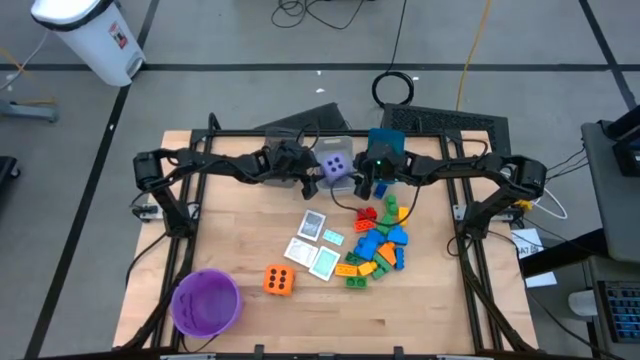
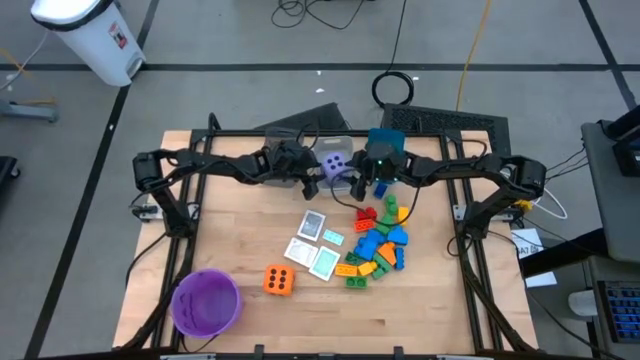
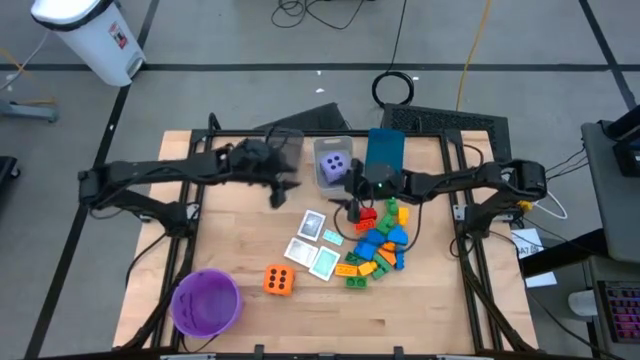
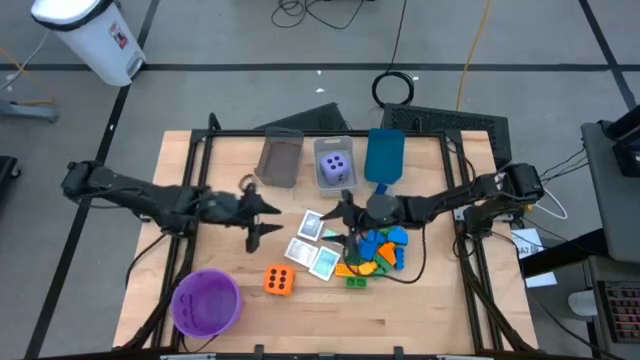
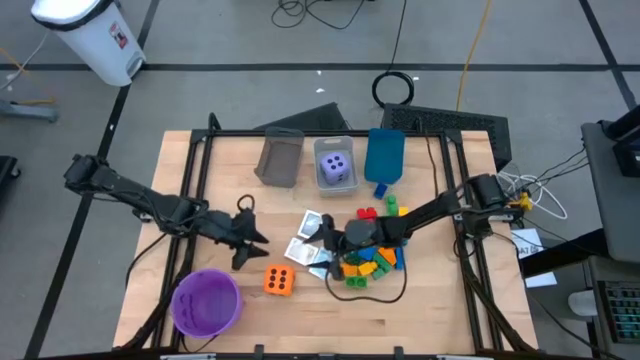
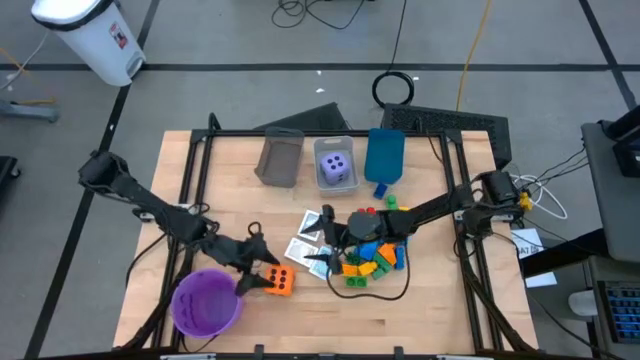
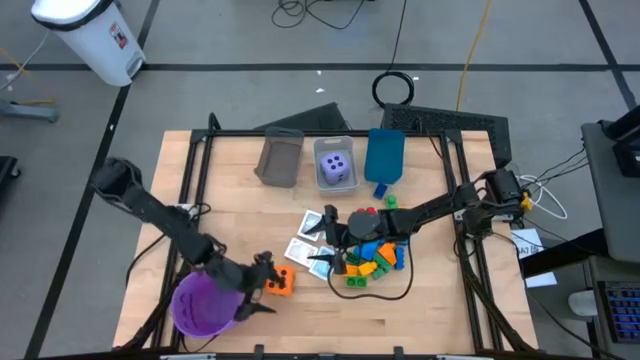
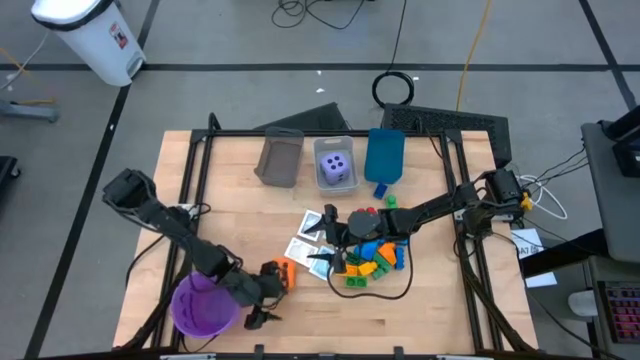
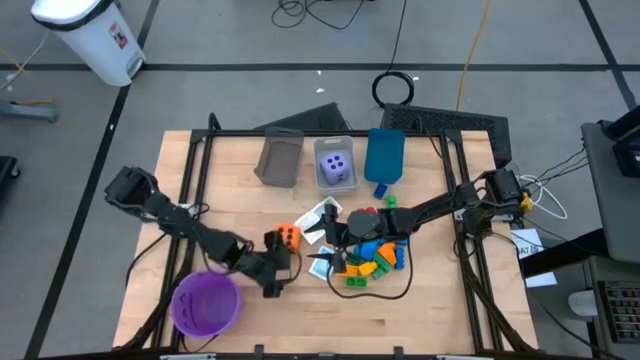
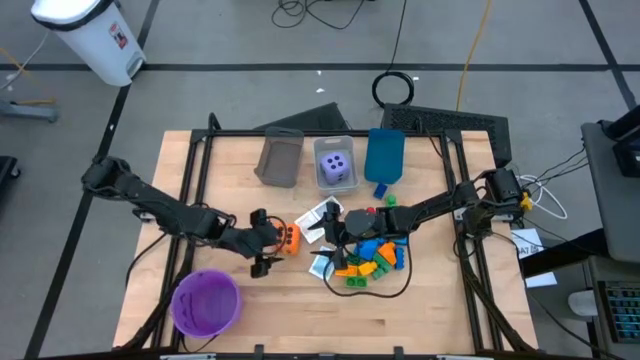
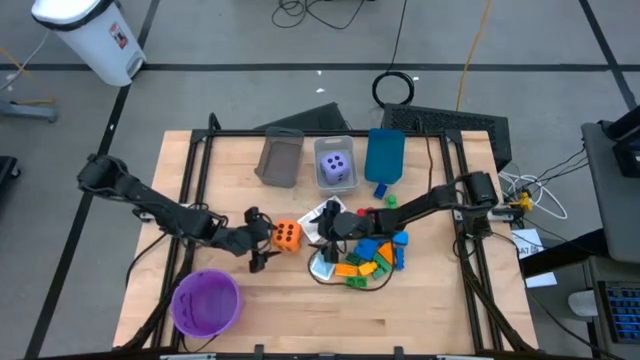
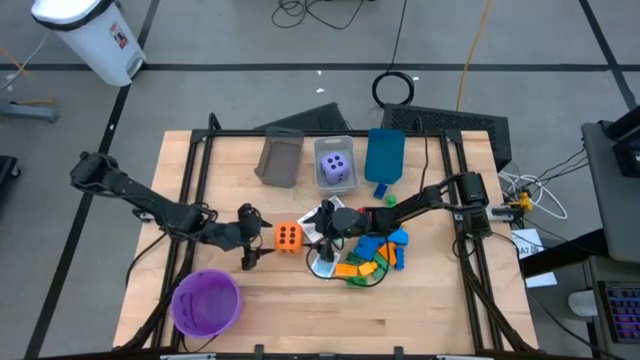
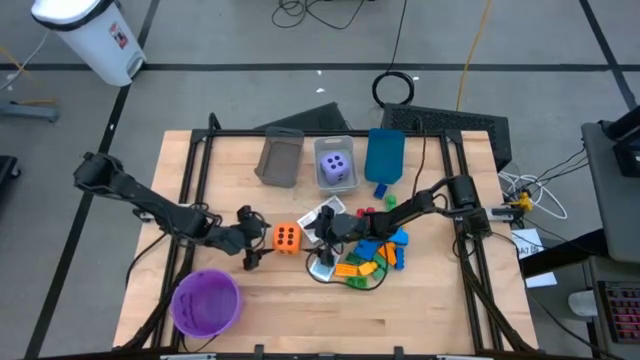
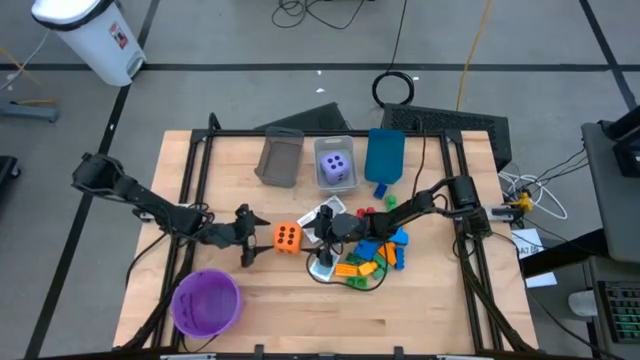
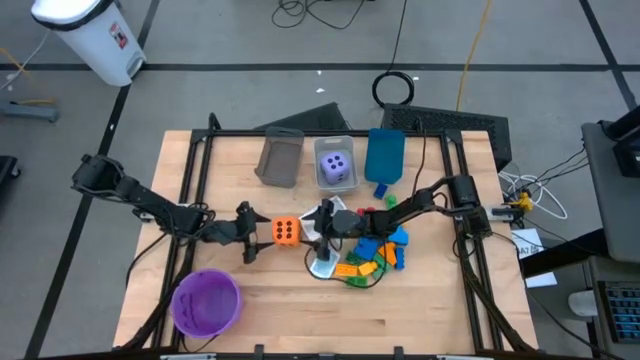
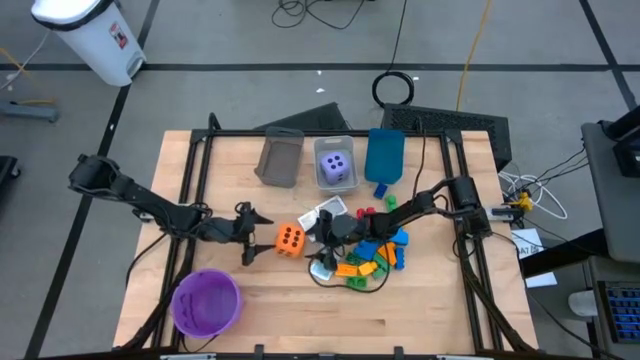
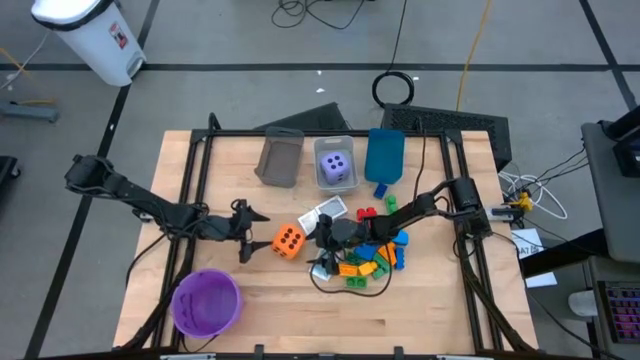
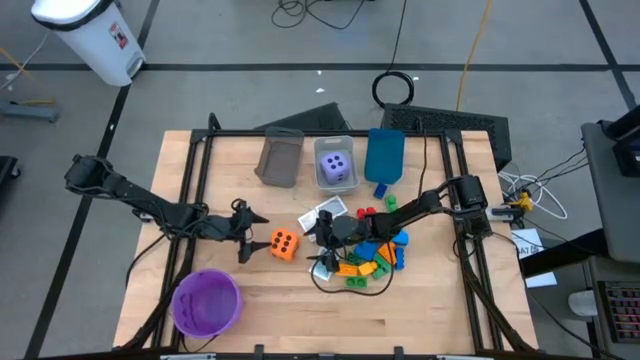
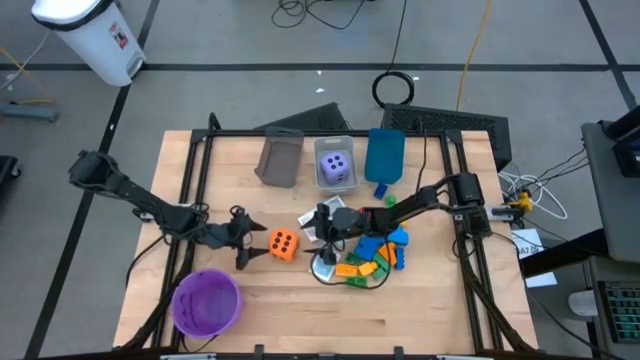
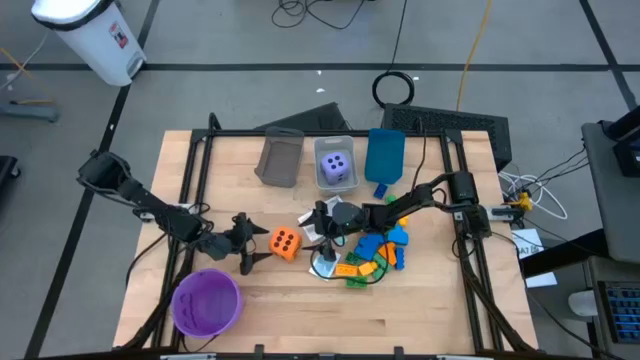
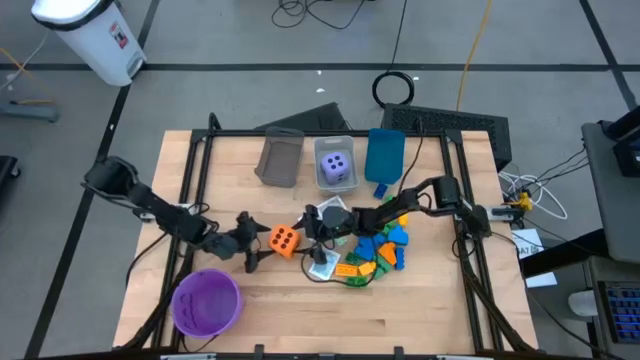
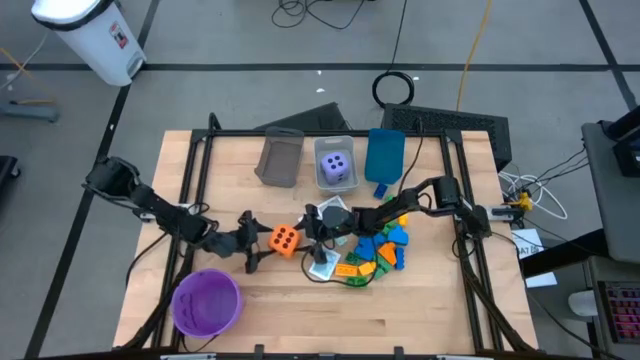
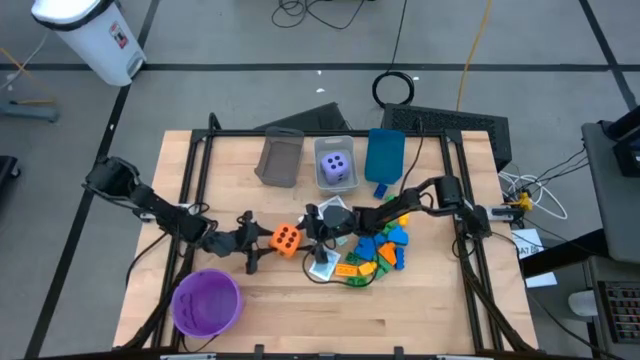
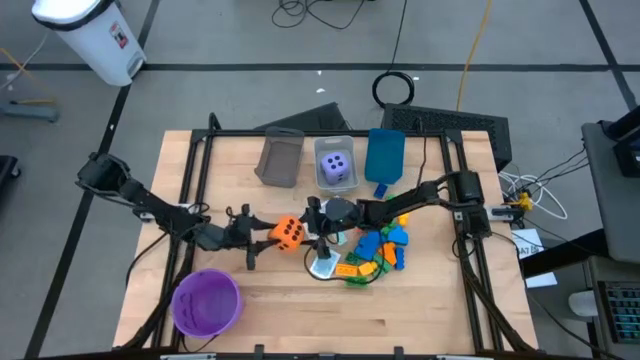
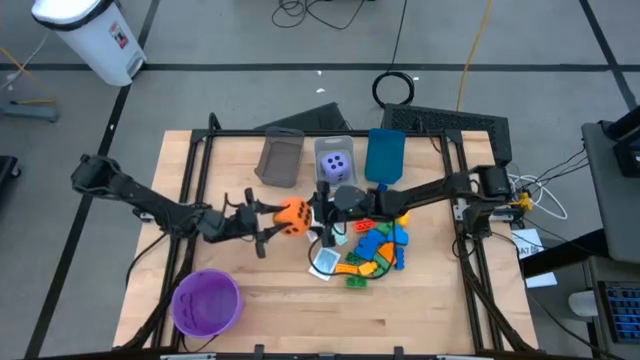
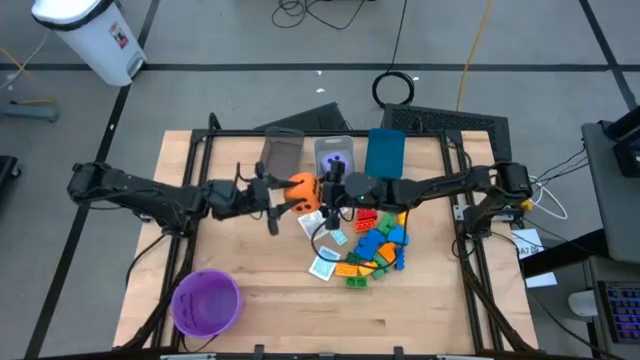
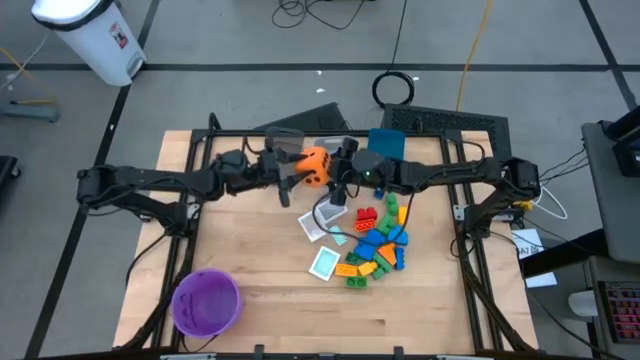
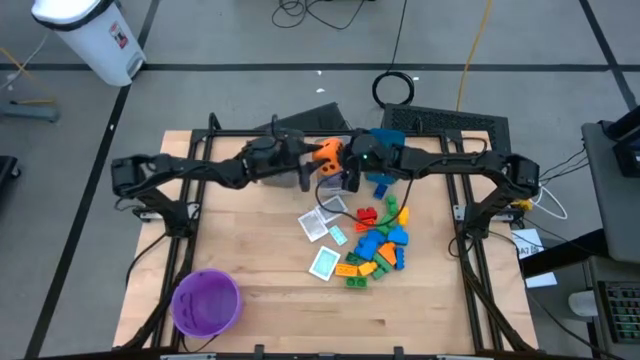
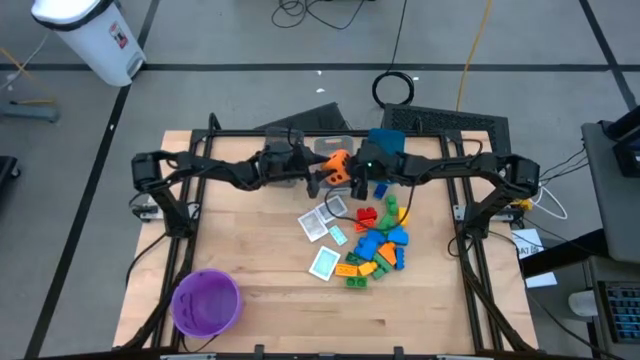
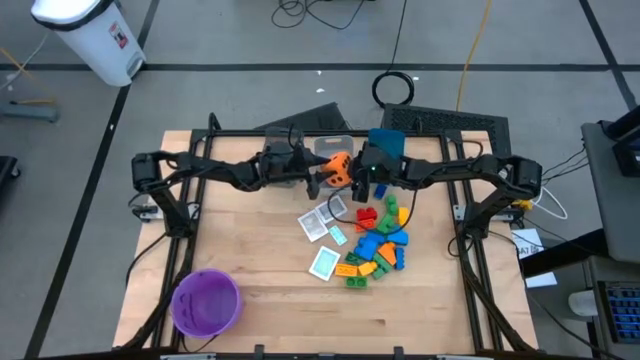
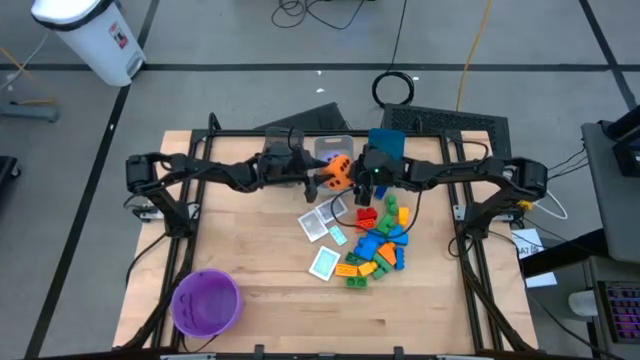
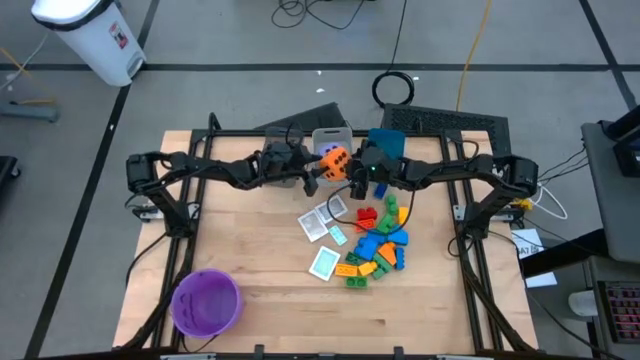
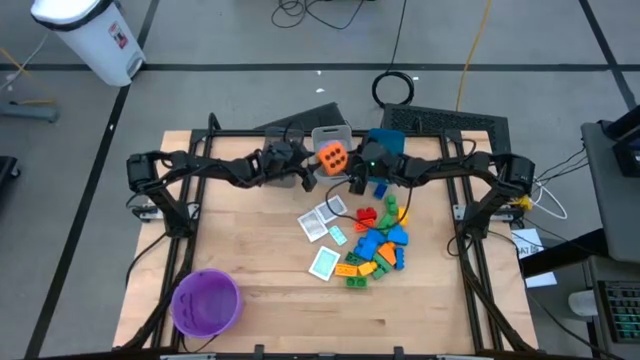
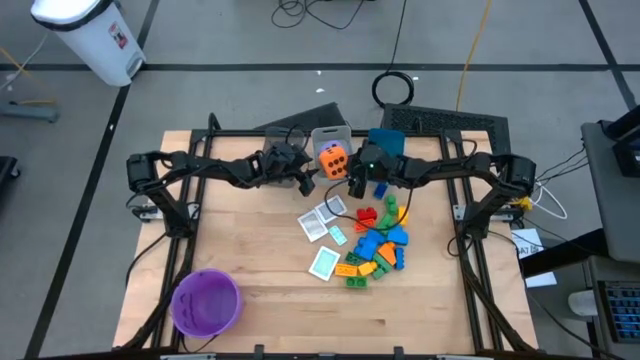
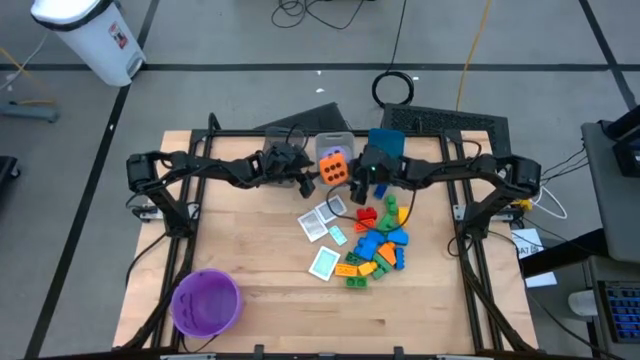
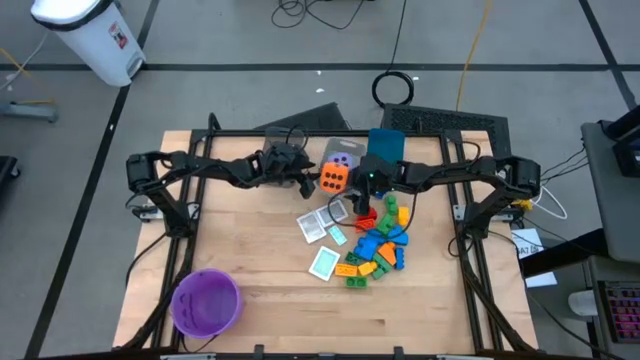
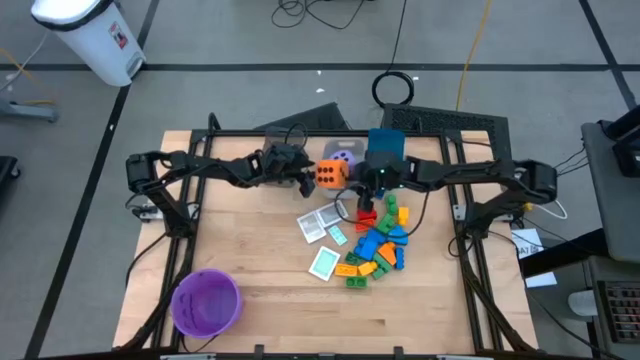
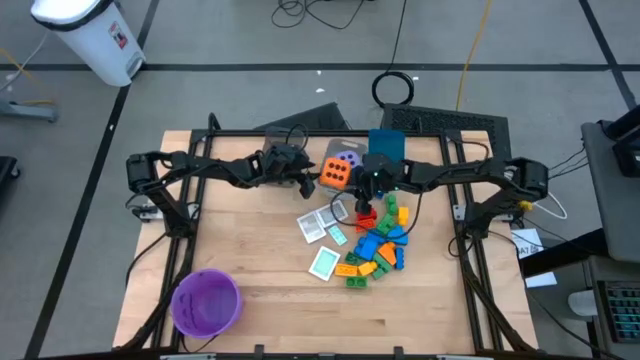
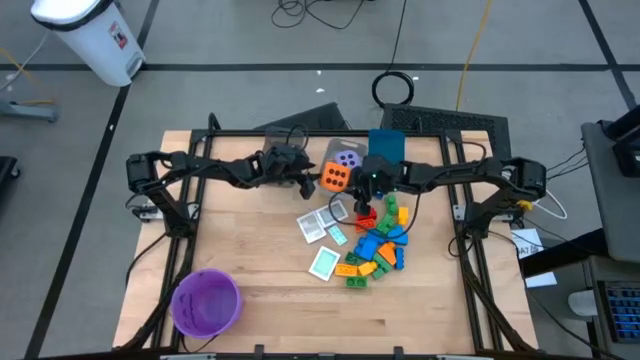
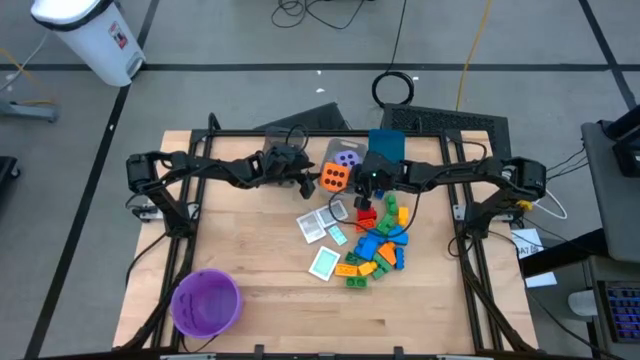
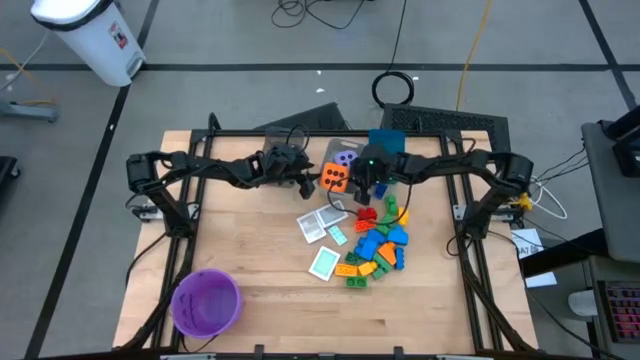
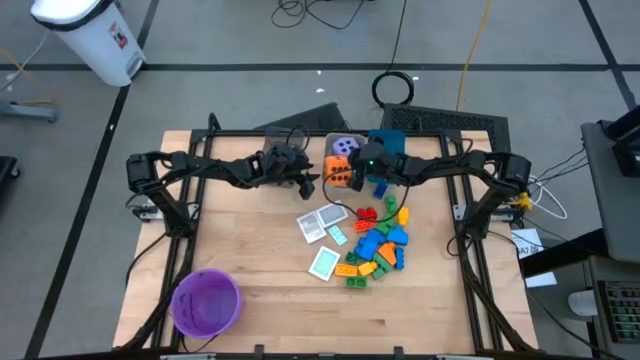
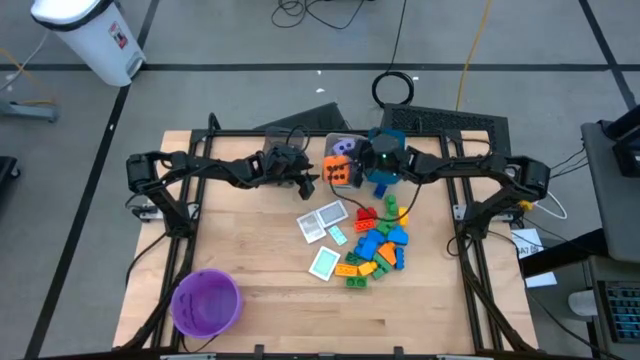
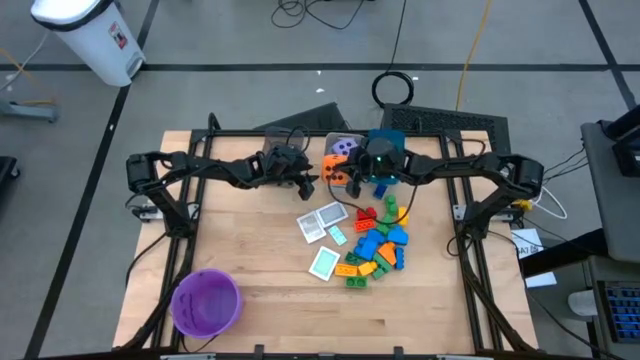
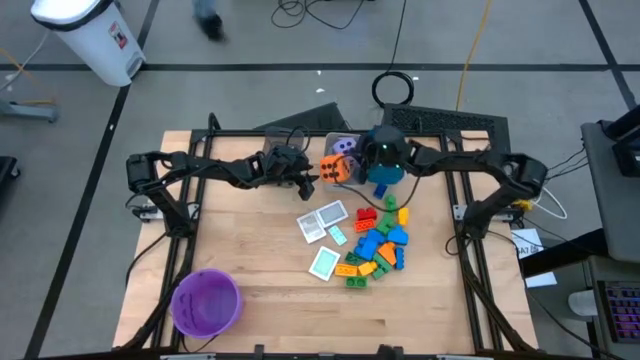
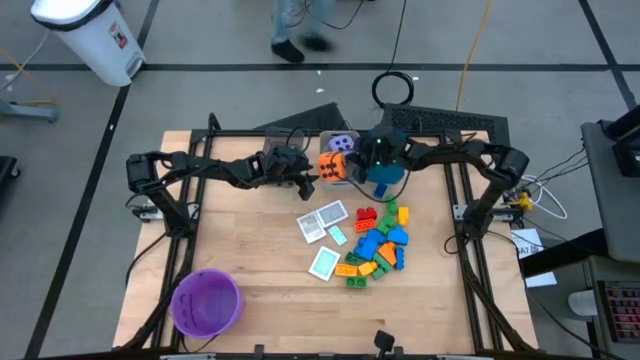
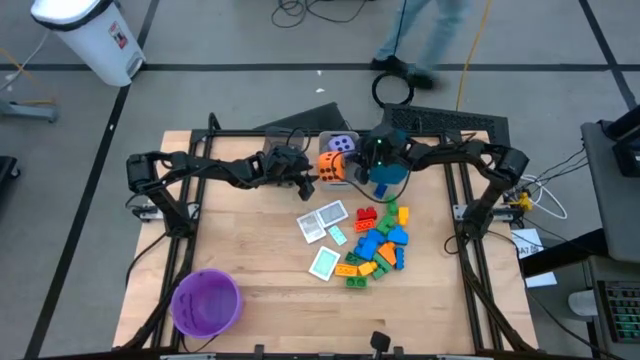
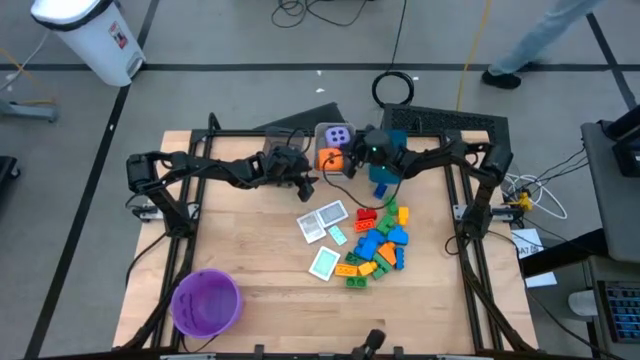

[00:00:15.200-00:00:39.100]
Task: Pick & Place Toys
Put the orange dice into the gray bin
